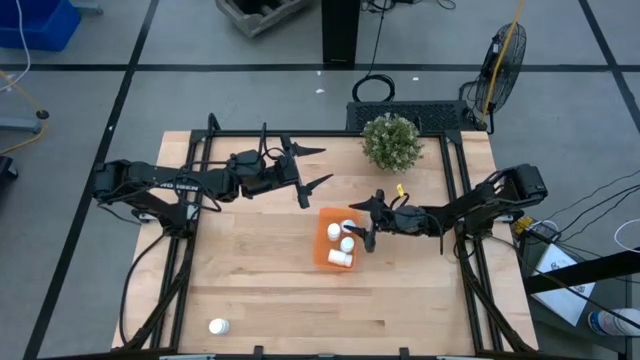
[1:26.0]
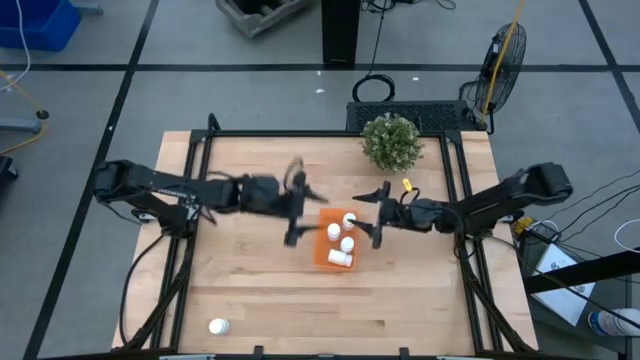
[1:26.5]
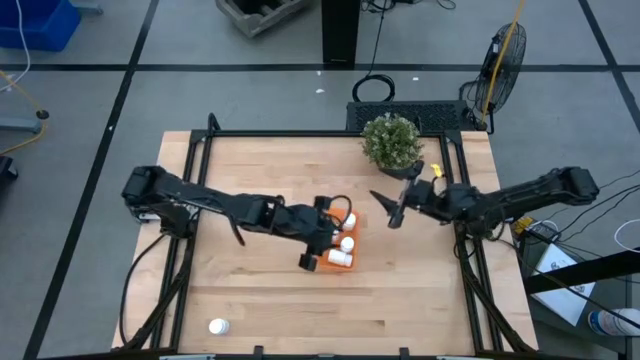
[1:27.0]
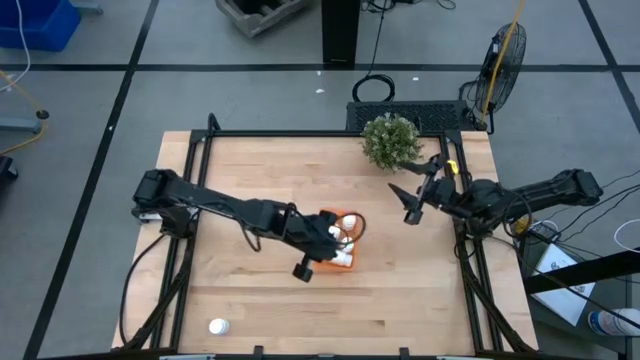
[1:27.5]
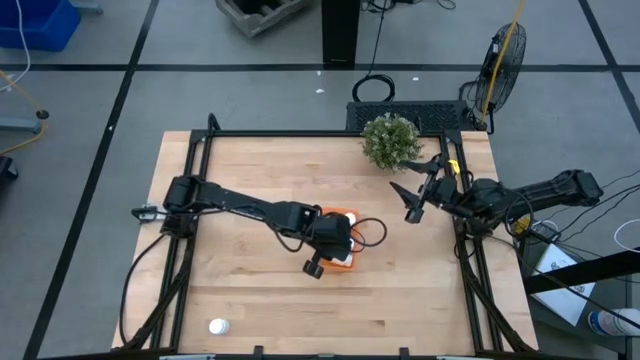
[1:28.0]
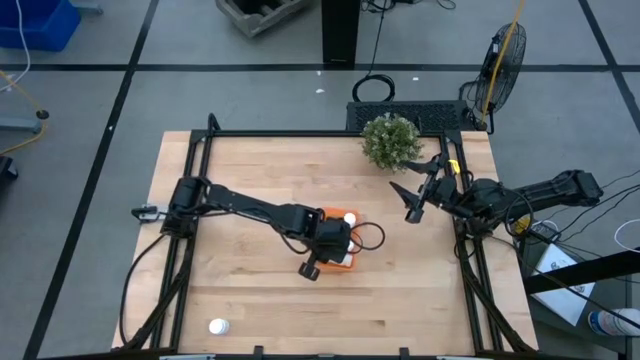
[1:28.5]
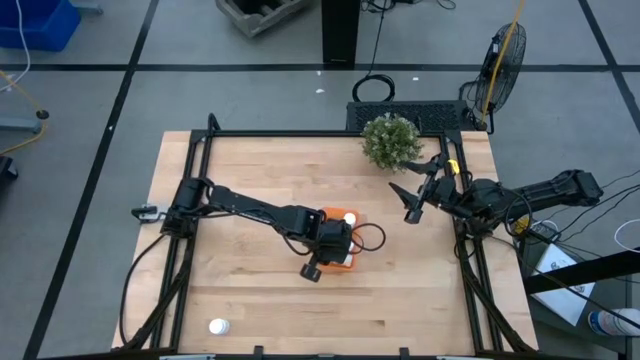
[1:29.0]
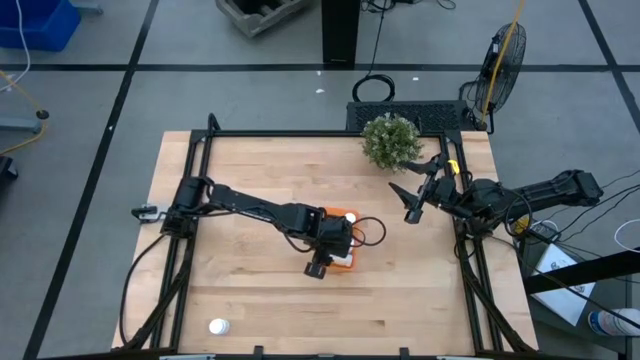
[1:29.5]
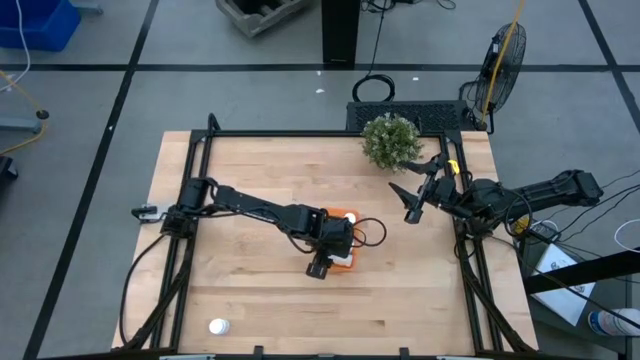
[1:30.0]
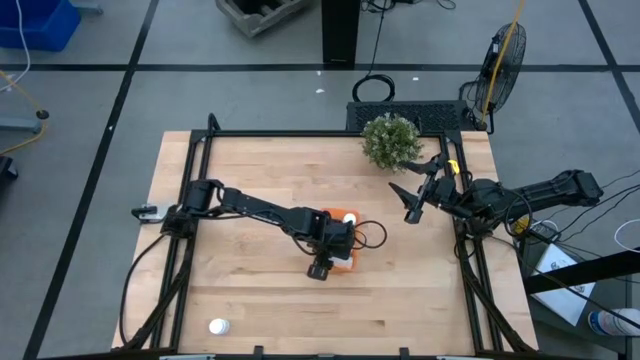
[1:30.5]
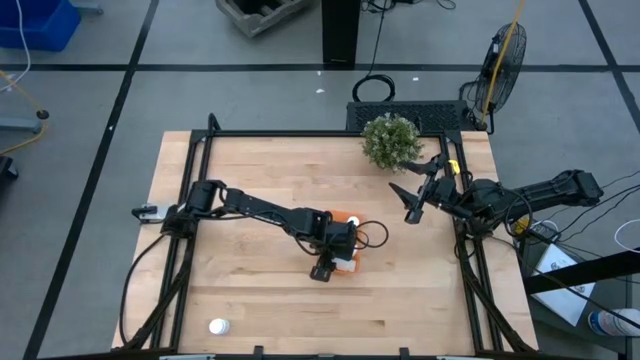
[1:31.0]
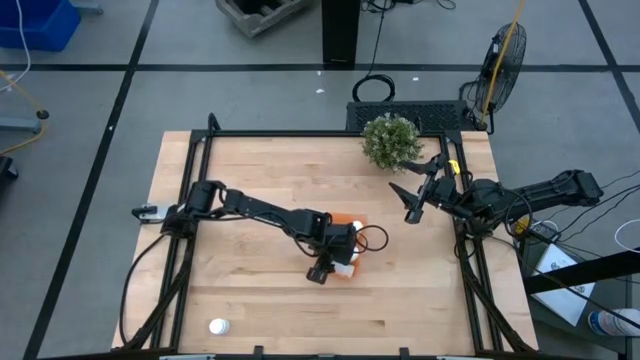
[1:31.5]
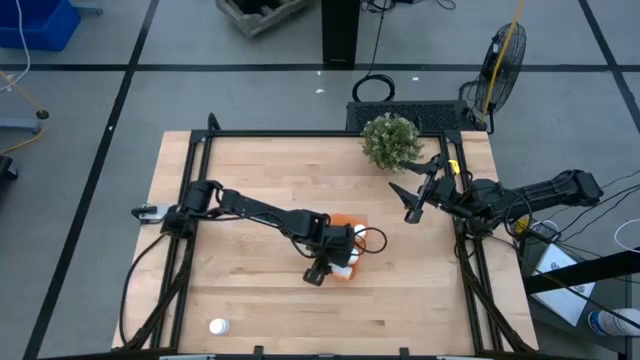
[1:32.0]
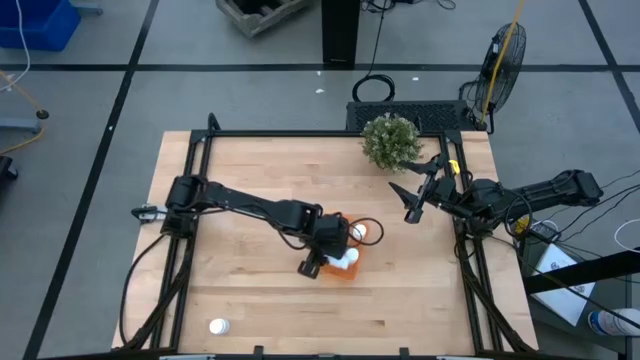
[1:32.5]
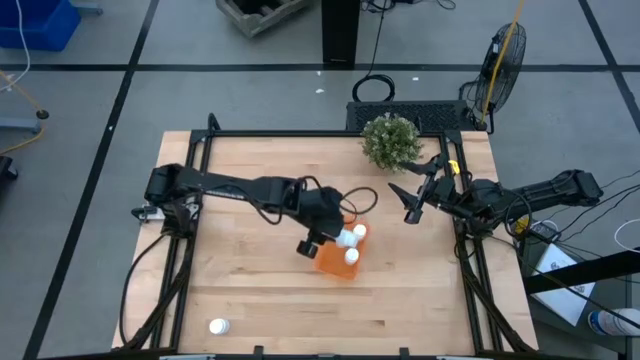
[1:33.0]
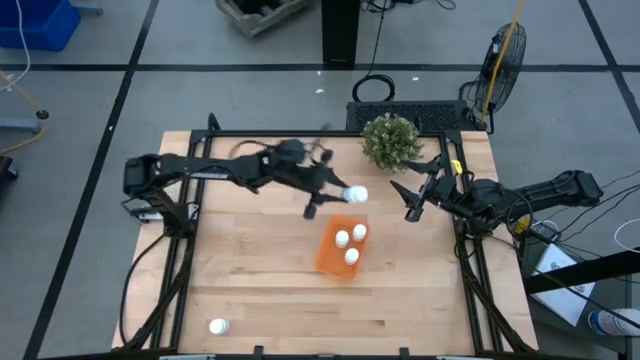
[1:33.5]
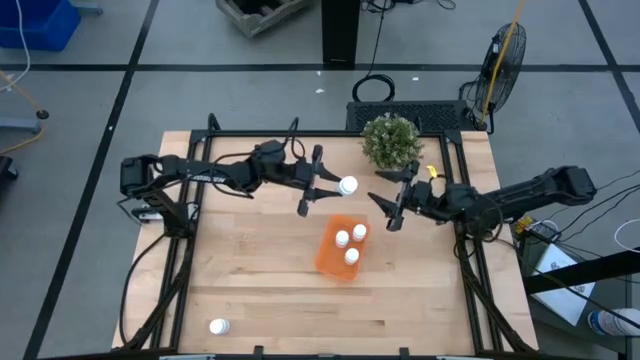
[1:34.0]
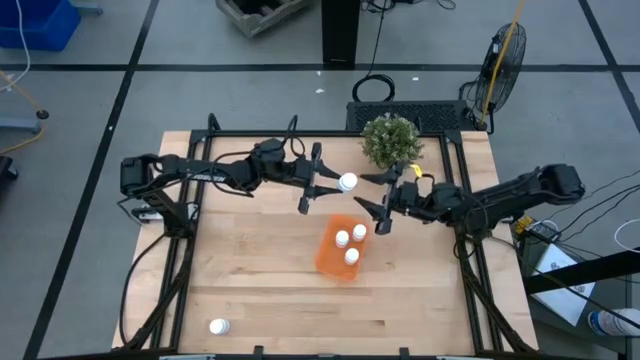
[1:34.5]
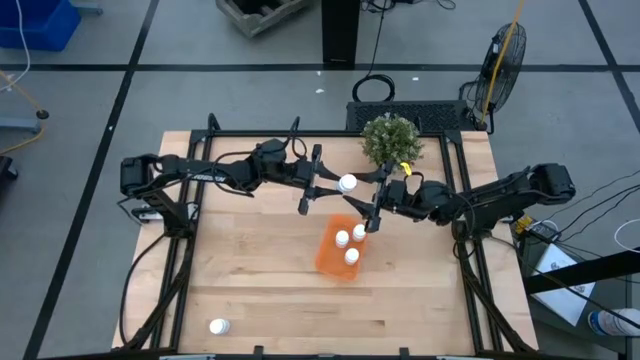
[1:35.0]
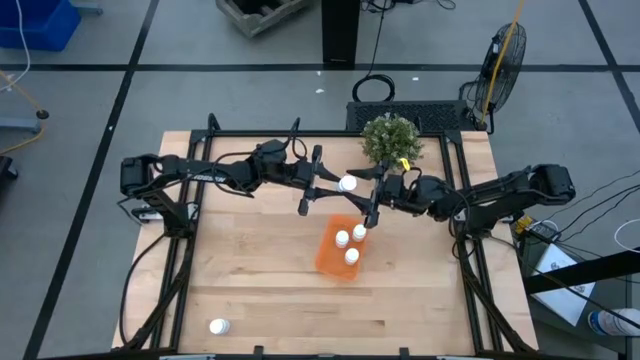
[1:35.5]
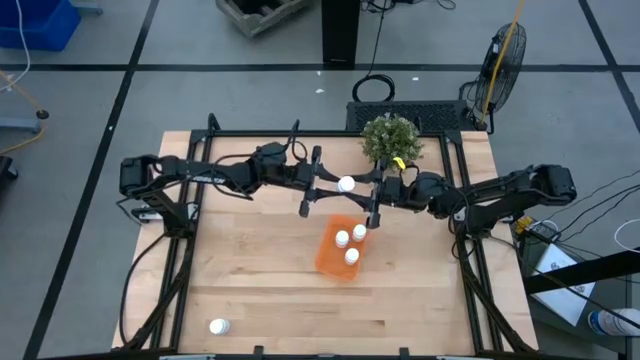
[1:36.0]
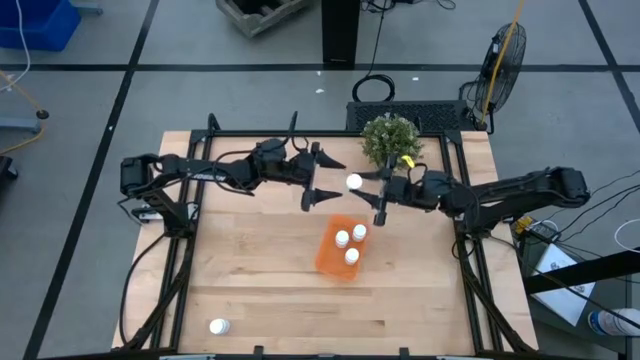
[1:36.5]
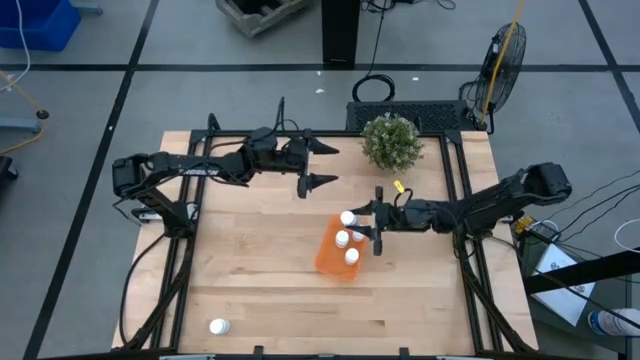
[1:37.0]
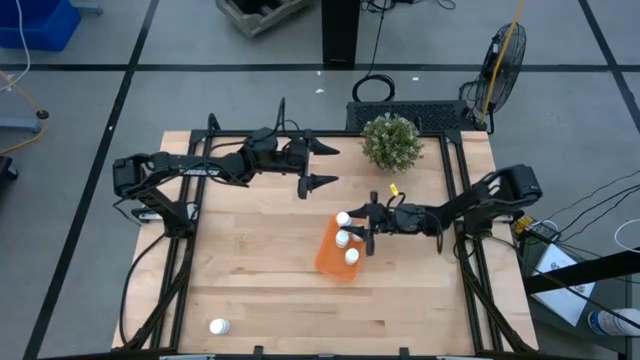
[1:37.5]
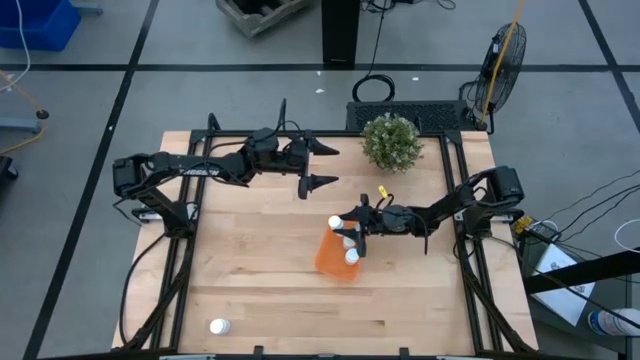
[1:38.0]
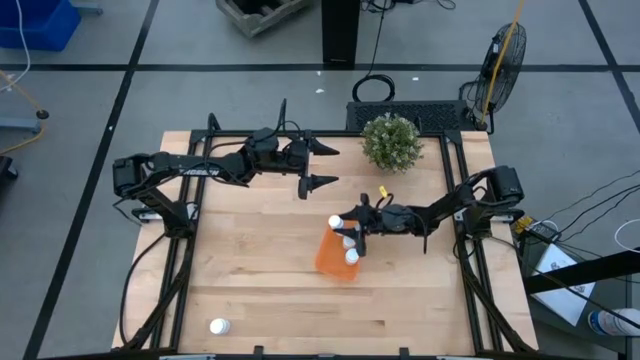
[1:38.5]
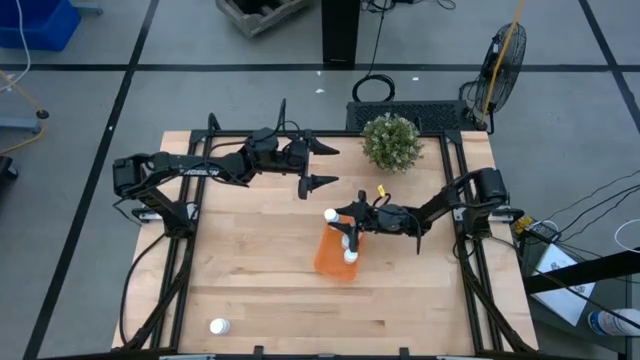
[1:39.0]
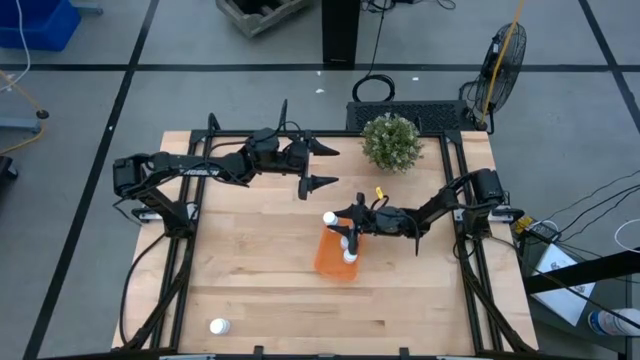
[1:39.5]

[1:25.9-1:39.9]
Task: Pick and place pill bottles into a basket
Adjust the white pill bottle in the orange container

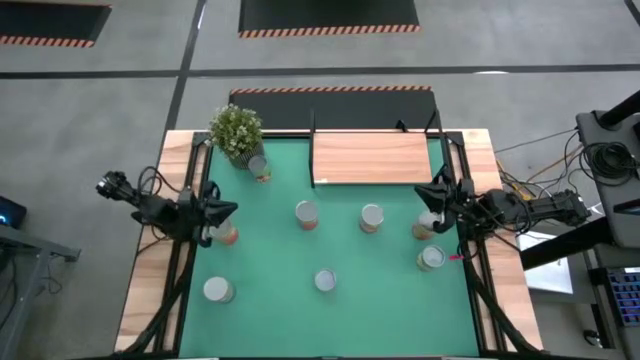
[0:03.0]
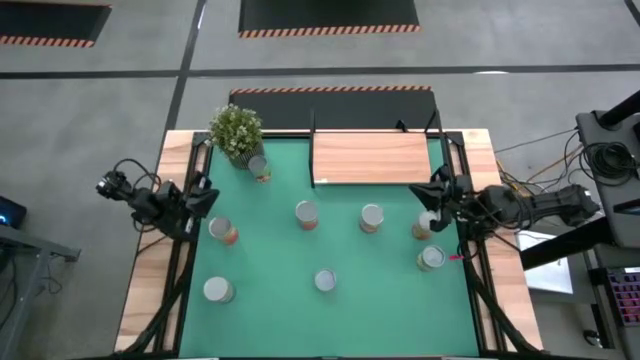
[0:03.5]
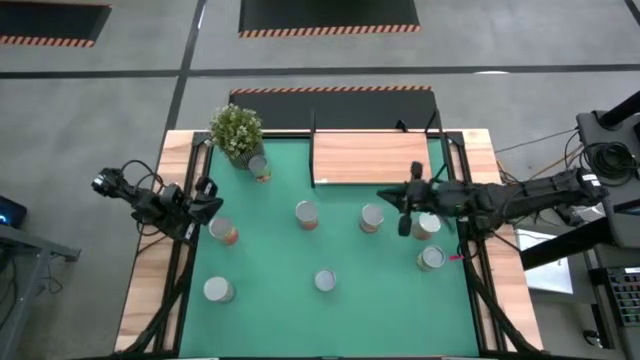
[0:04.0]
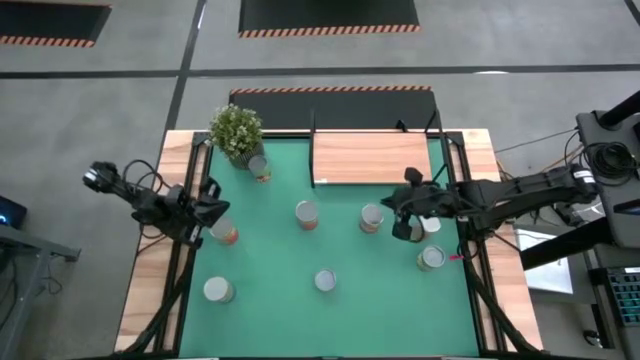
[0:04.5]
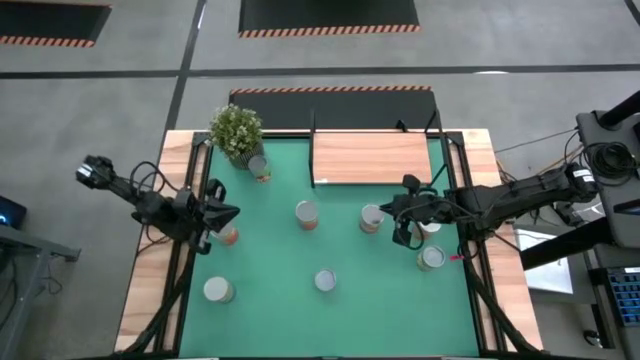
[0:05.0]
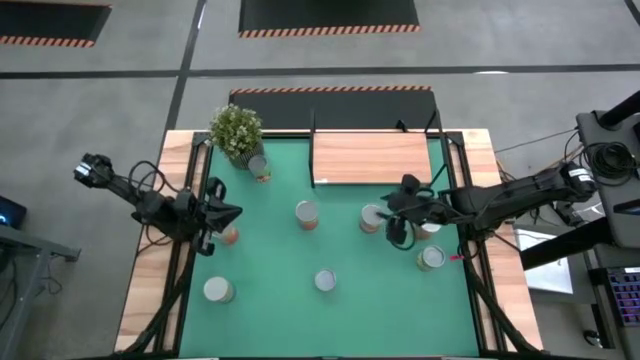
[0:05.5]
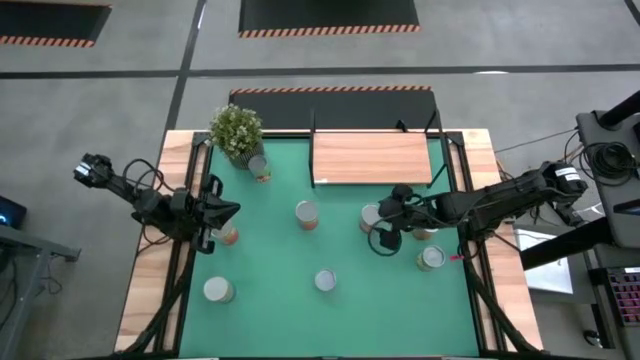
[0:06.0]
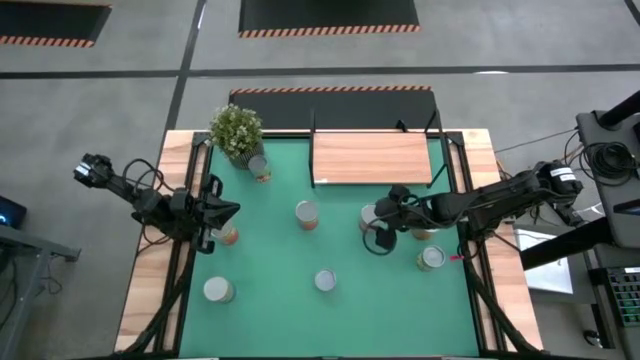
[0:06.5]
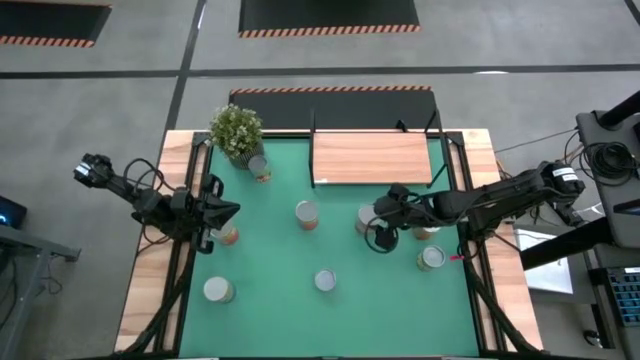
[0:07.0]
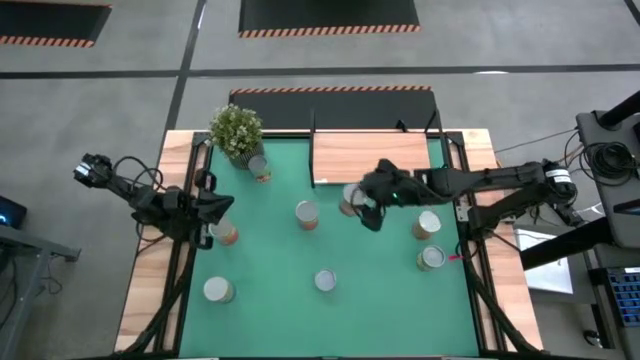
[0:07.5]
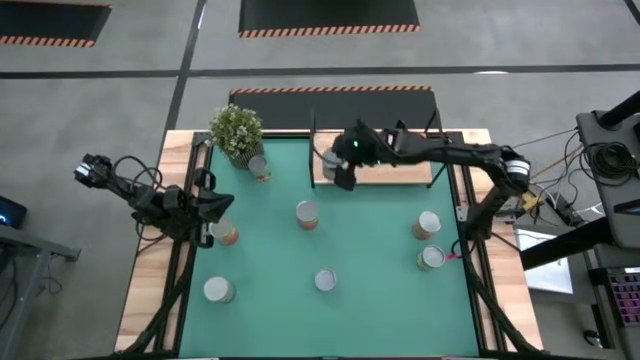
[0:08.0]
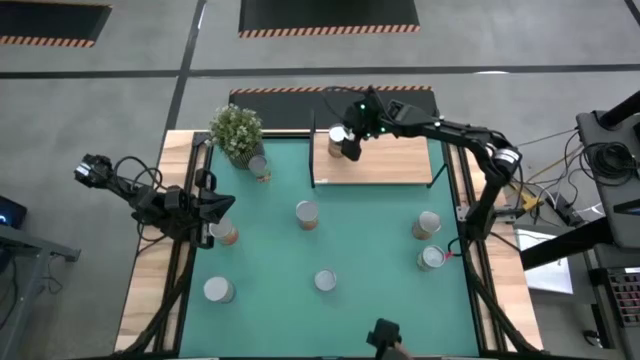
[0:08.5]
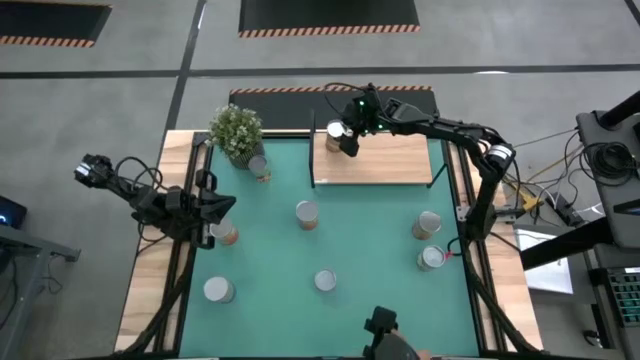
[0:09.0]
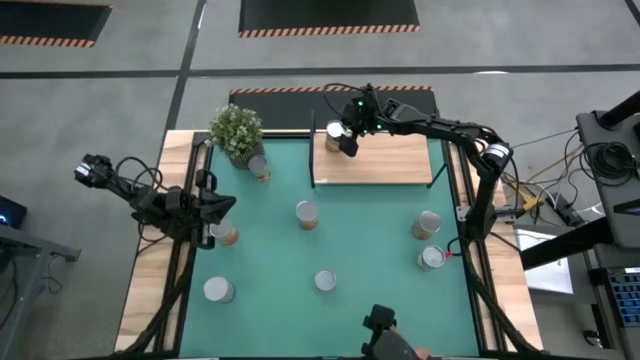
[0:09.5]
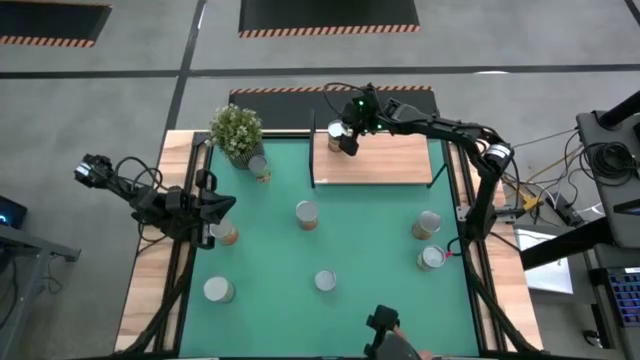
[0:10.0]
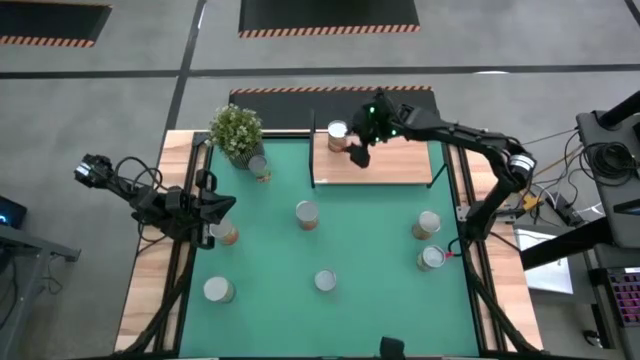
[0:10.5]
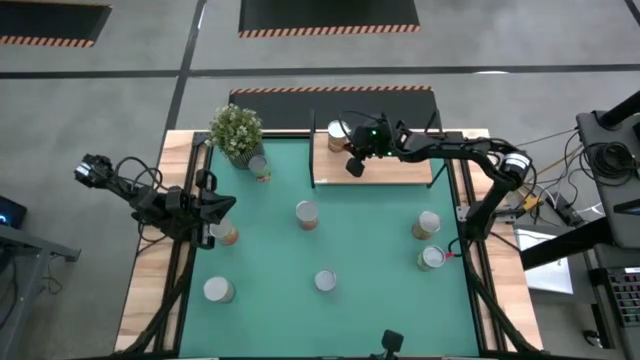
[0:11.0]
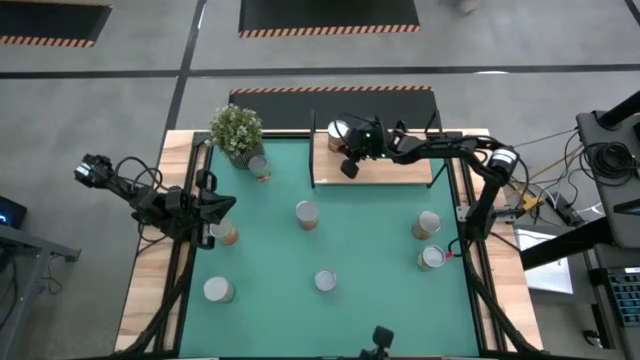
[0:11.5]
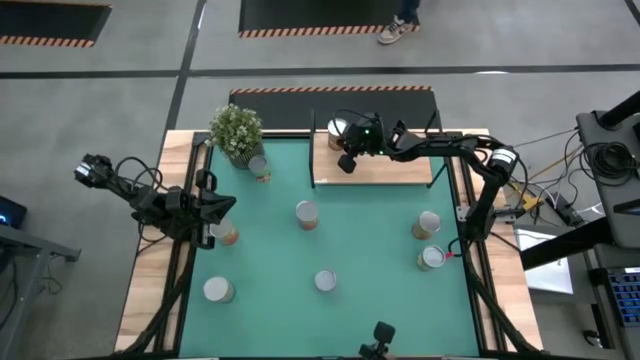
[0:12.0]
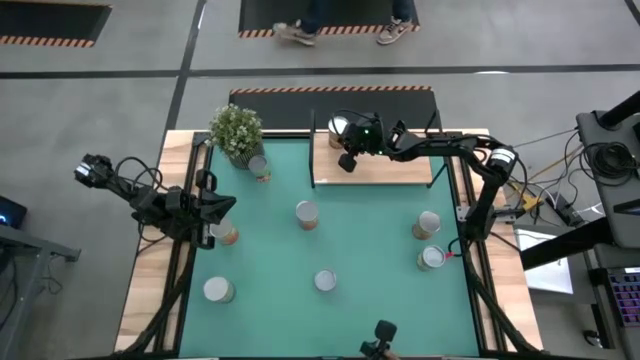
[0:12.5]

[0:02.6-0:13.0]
Task: Pick and place cans onto a shelf
Put the orange can on the shelf
